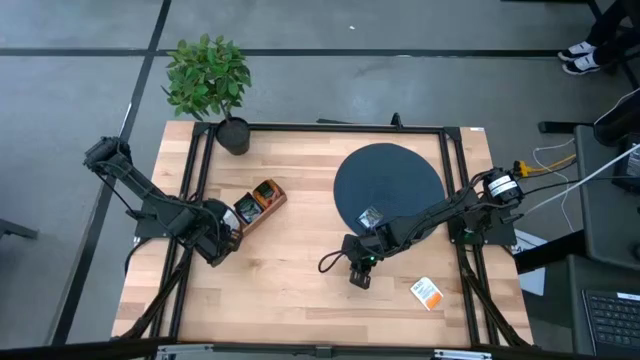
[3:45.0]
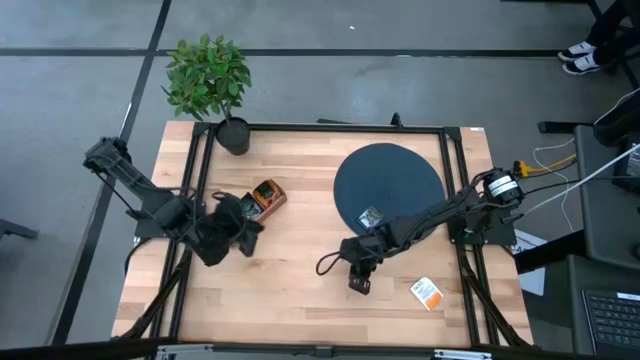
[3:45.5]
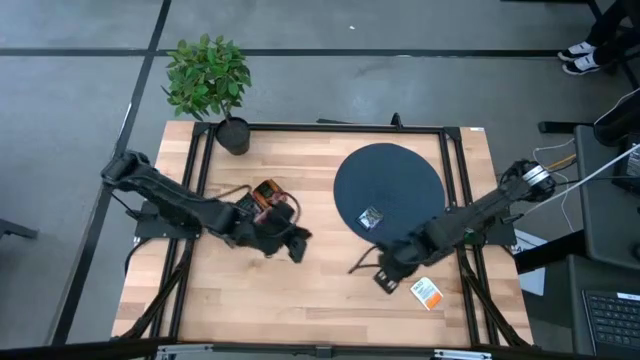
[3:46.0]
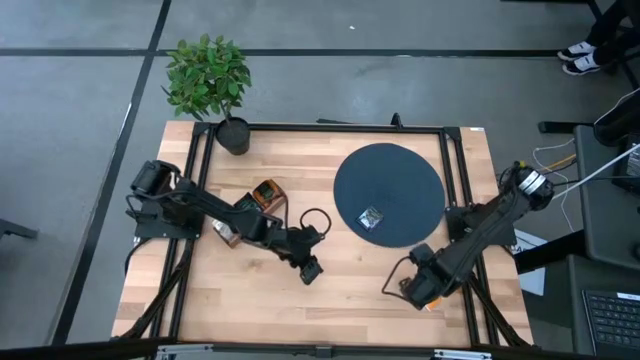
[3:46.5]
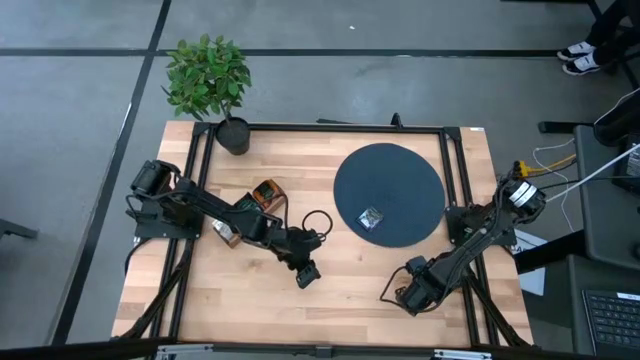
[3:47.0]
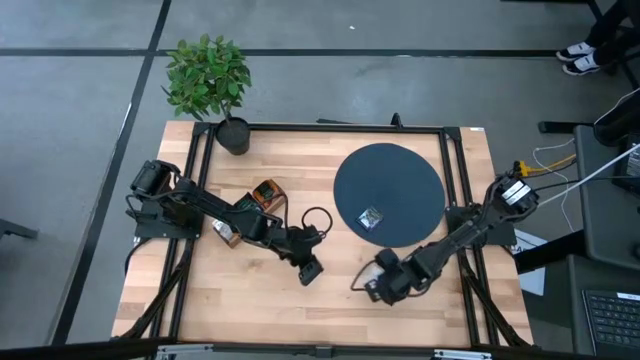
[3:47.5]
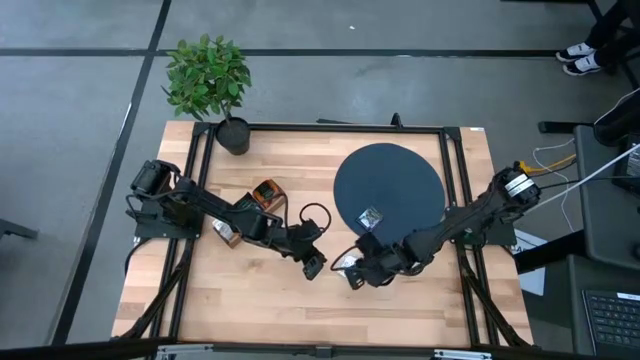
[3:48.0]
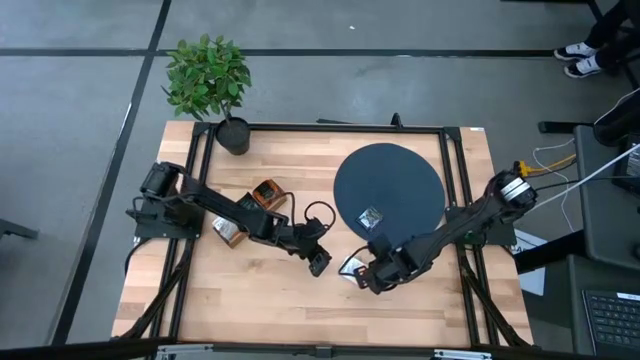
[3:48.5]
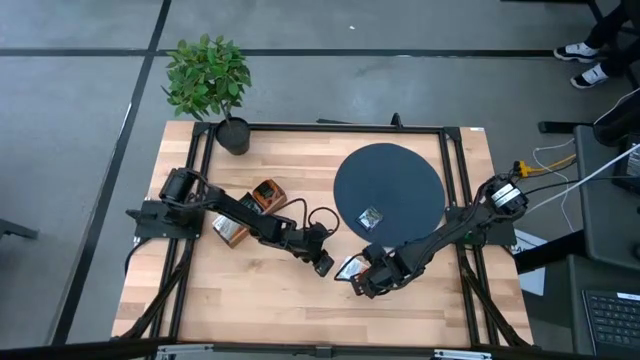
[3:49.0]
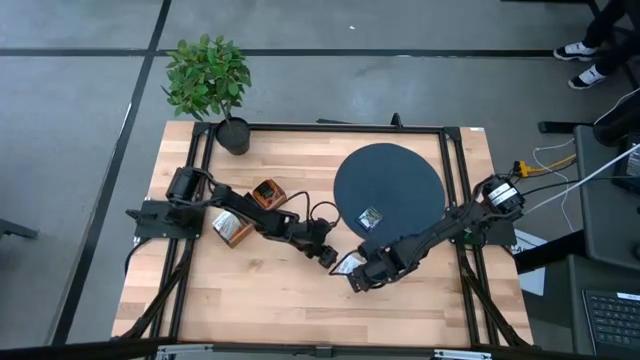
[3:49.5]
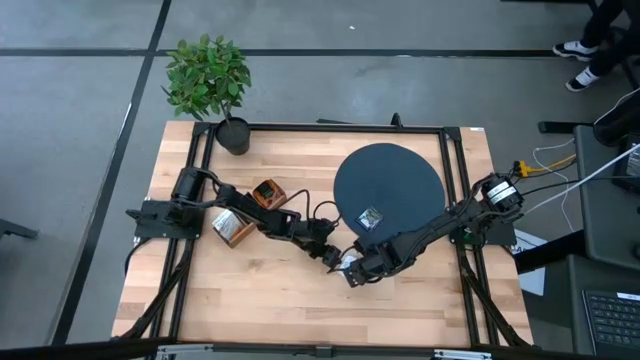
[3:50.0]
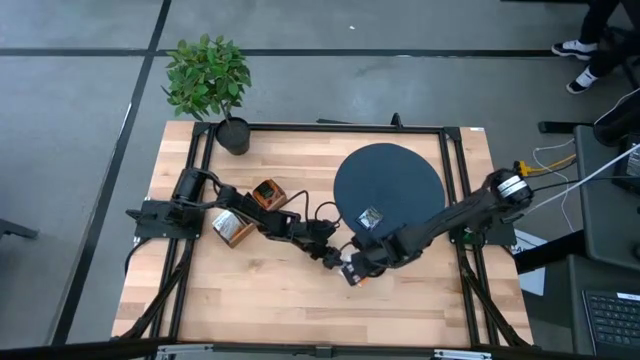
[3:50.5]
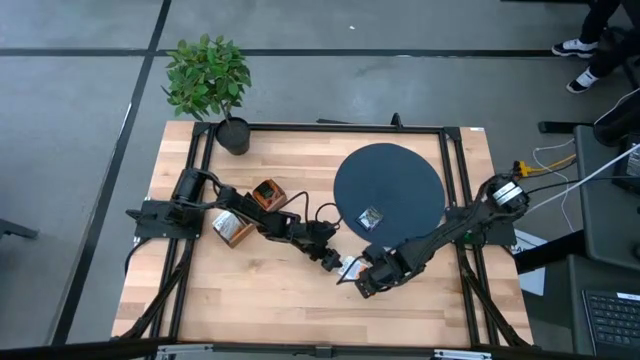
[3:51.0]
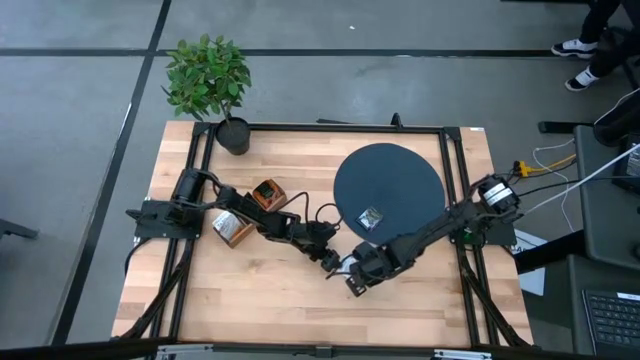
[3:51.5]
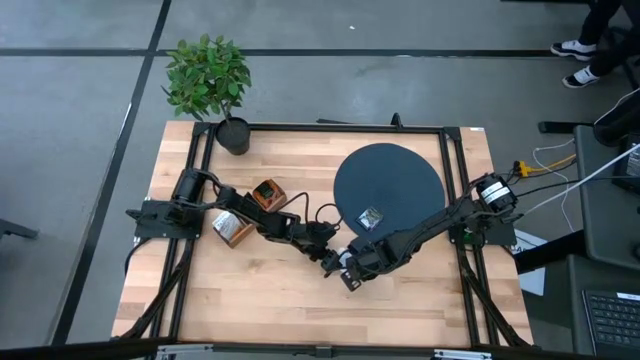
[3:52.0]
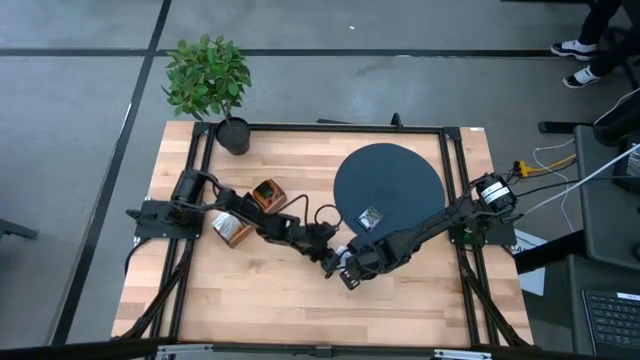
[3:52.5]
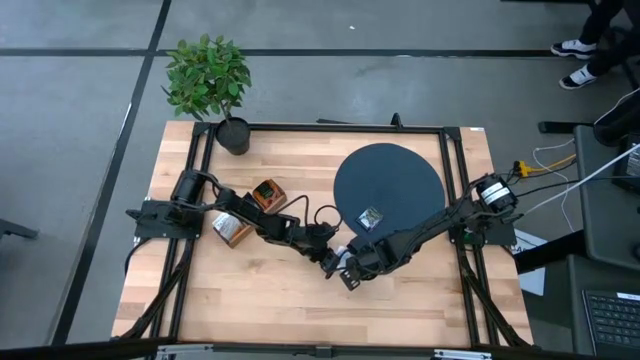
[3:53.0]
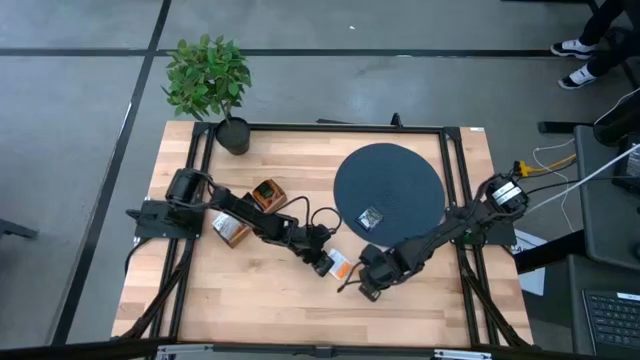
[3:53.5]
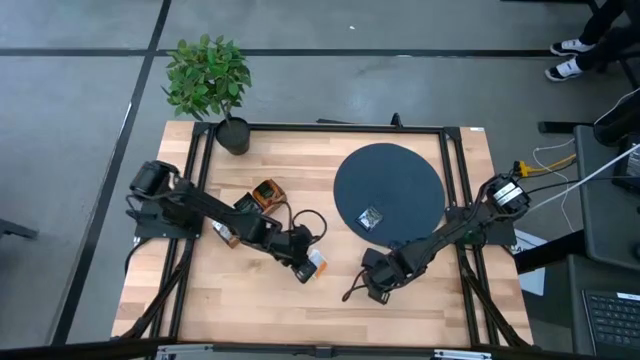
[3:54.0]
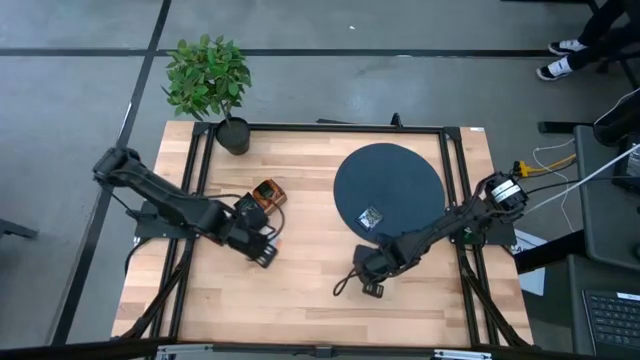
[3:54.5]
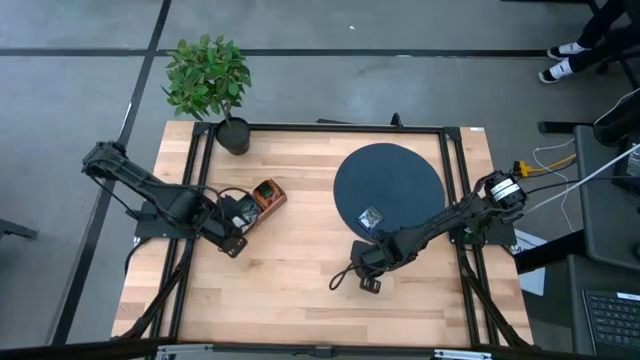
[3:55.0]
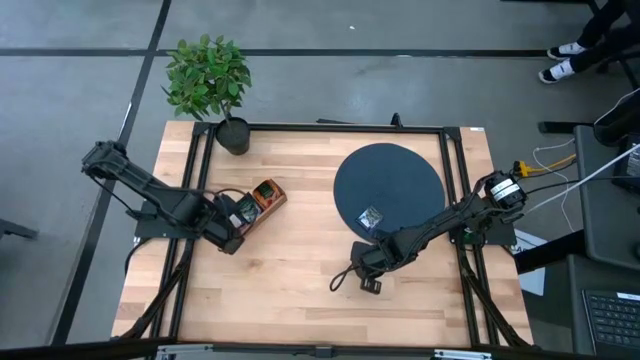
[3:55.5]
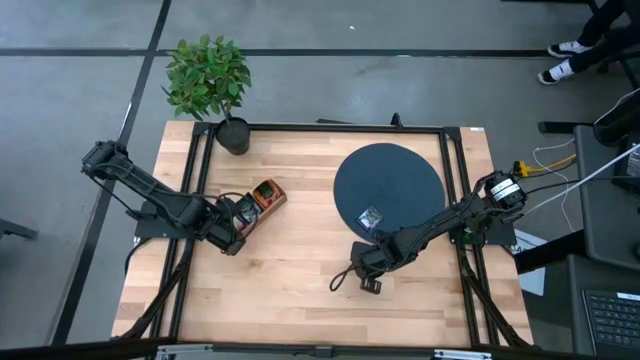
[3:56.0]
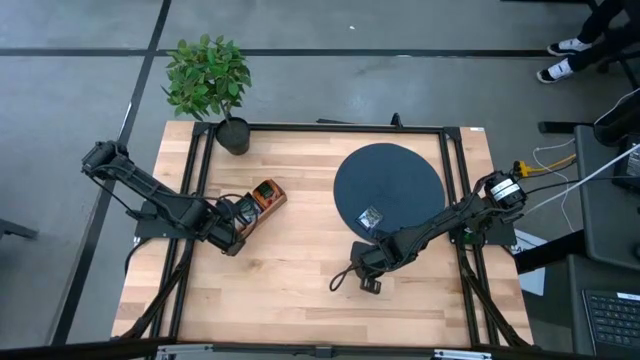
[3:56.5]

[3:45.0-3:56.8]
Task: Pick & Place Tea
Put the white tea bag into the left section of the wooden organizer

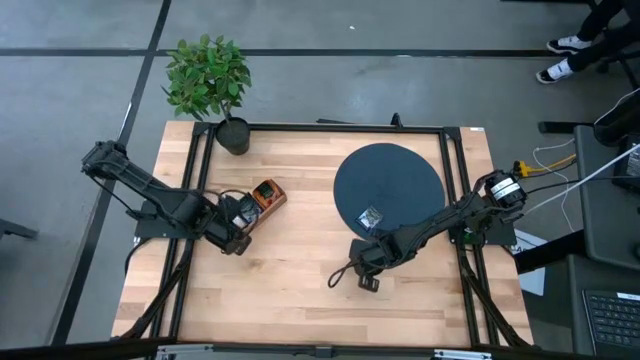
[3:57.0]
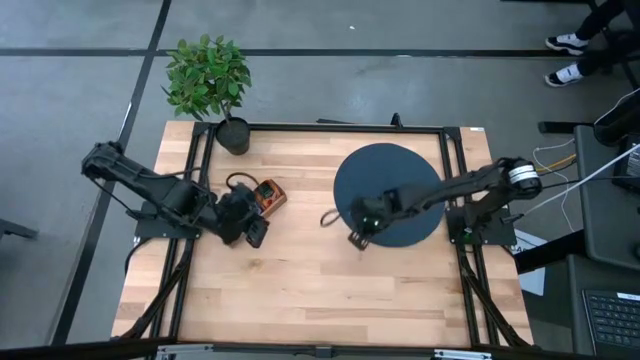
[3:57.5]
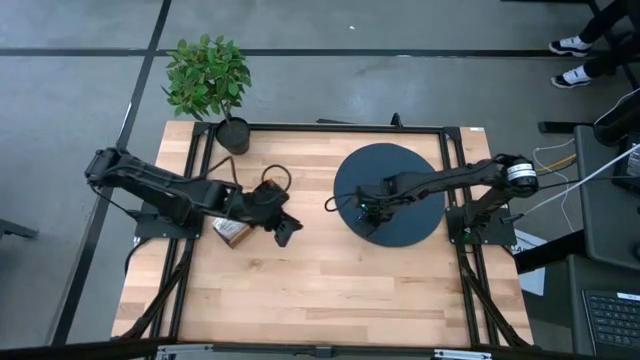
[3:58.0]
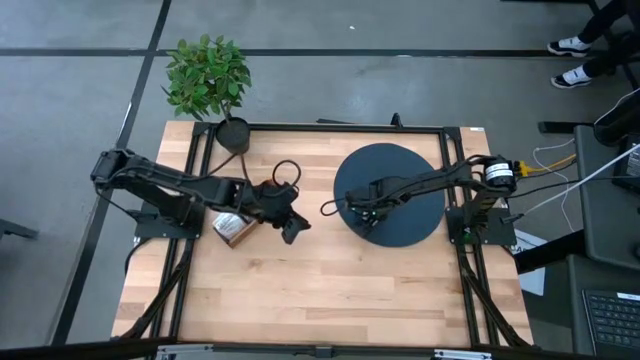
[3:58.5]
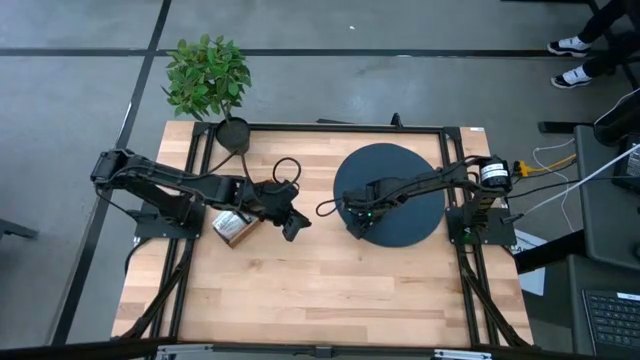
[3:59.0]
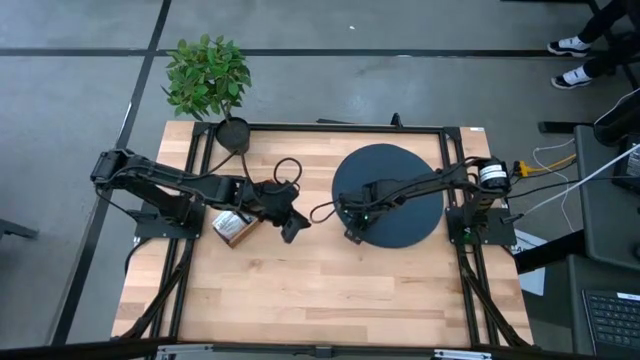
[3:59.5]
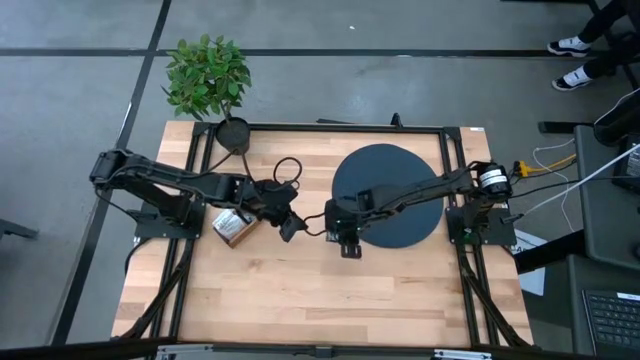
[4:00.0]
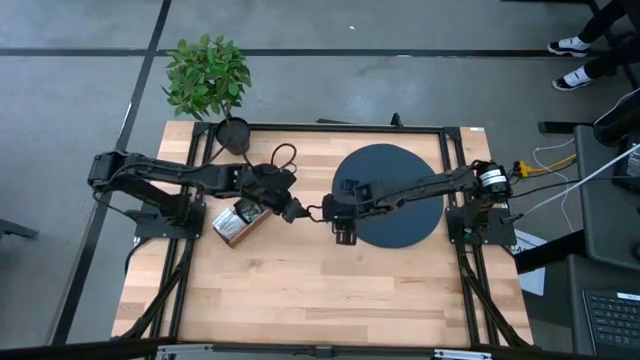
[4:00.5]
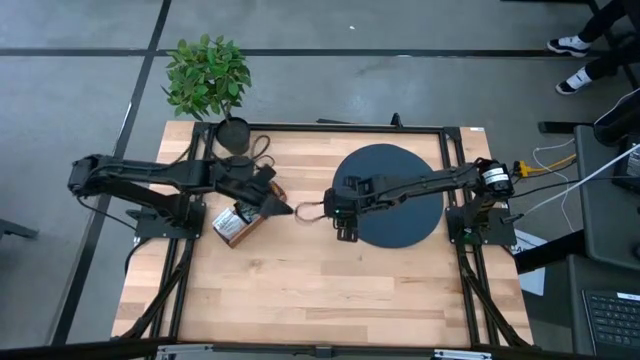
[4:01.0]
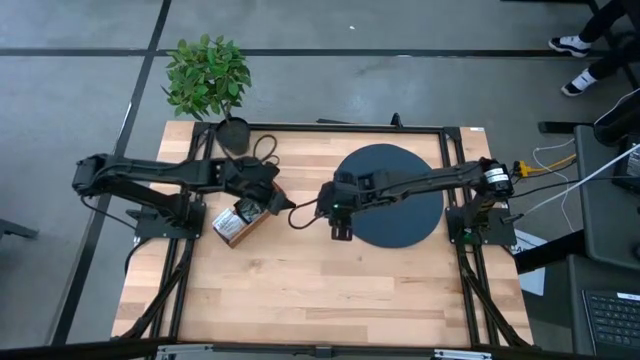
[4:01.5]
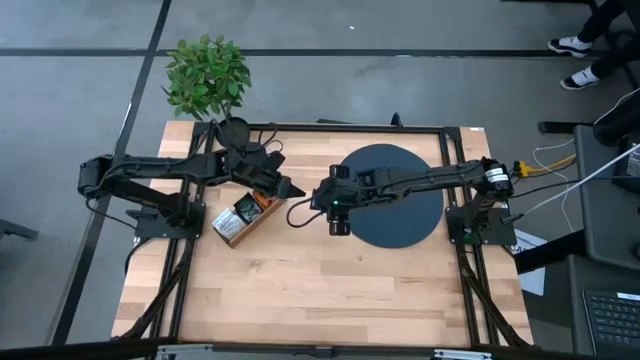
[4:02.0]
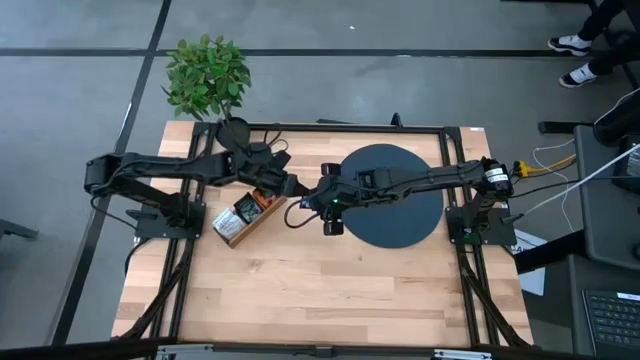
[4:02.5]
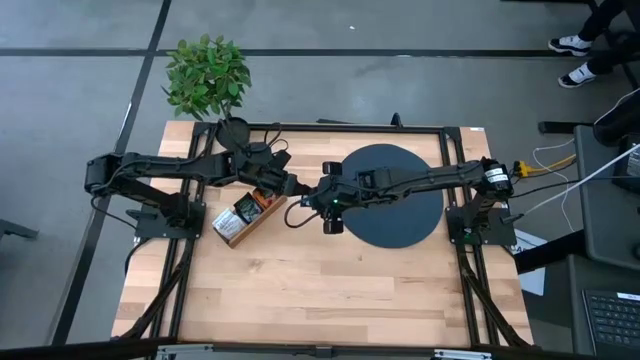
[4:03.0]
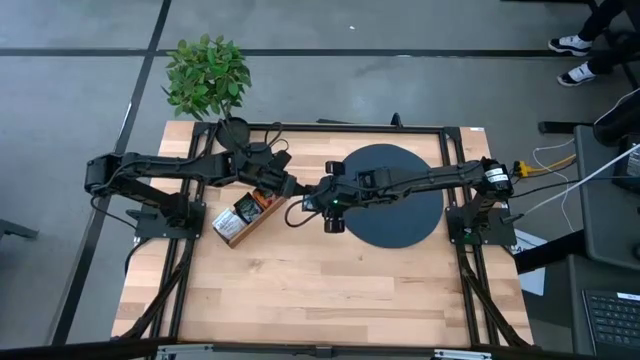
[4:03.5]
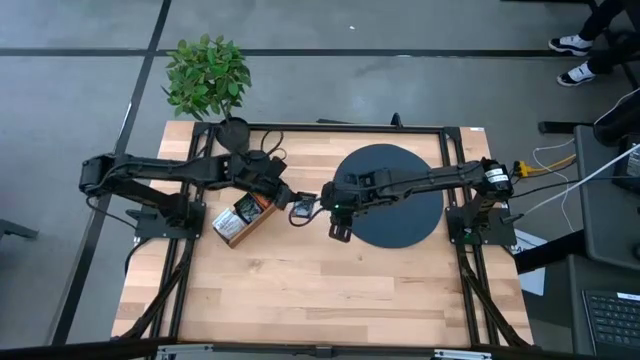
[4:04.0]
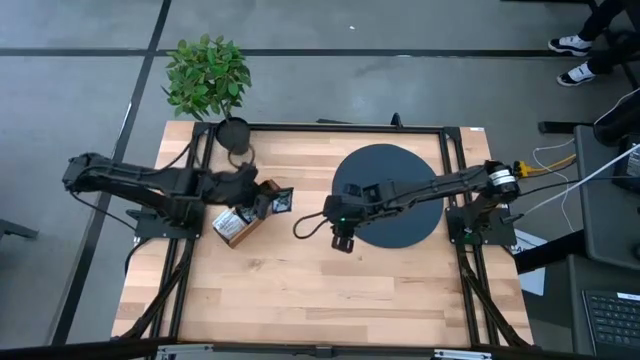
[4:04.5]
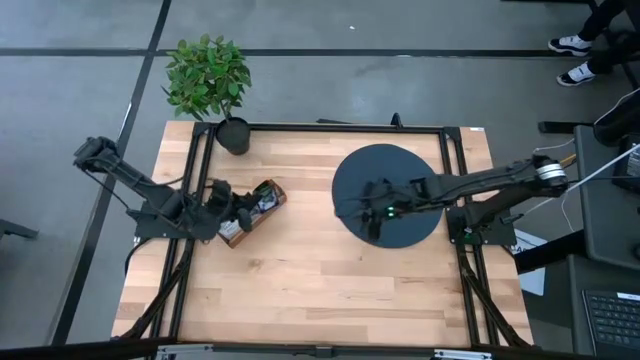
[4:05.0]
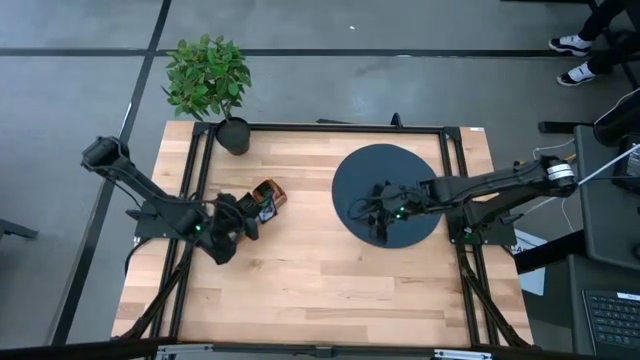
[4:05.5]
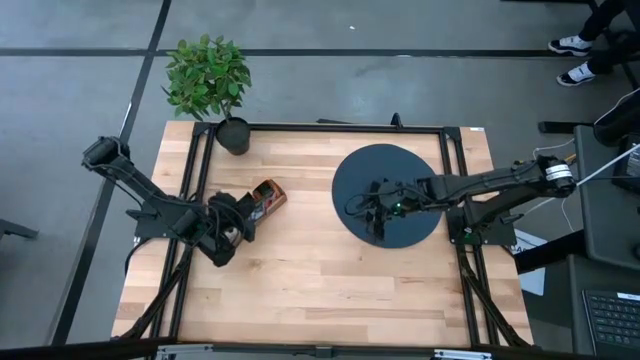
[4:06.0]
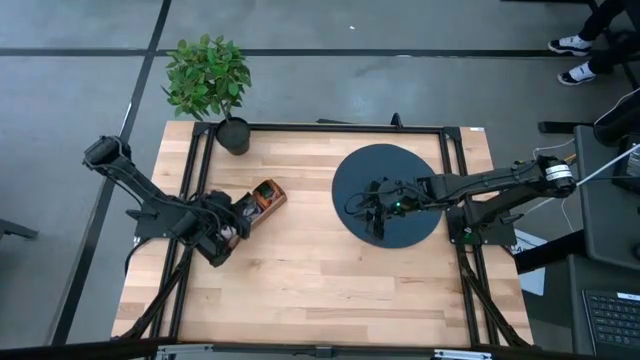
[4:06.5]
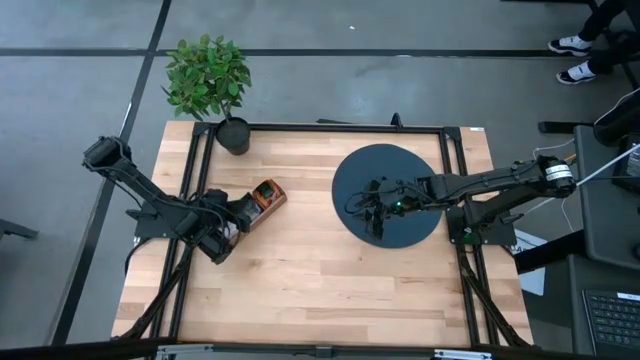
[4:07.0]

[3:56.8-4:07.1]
Put the black tea bag into the middle section of the wooden organizer
